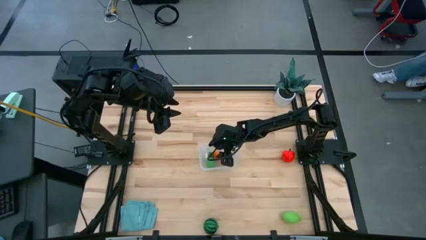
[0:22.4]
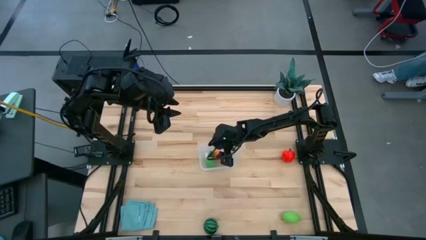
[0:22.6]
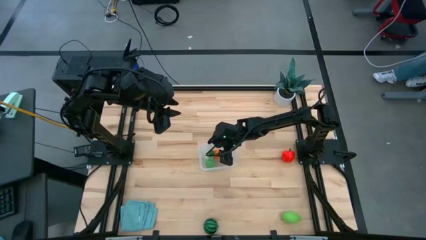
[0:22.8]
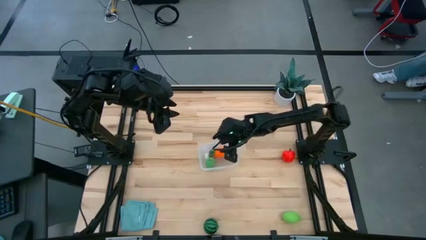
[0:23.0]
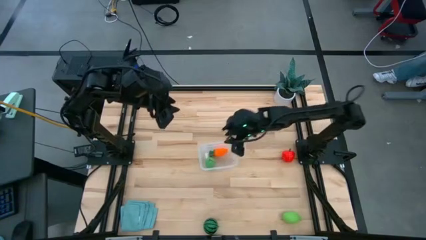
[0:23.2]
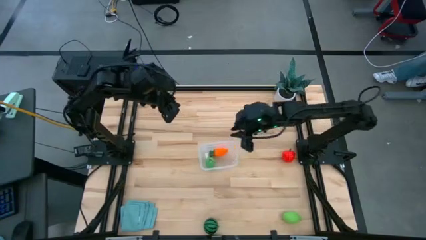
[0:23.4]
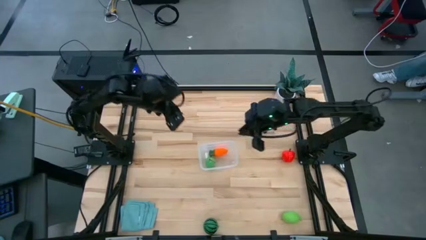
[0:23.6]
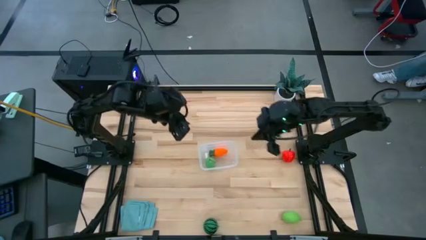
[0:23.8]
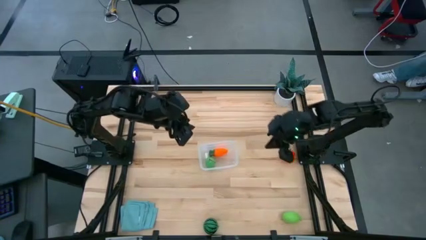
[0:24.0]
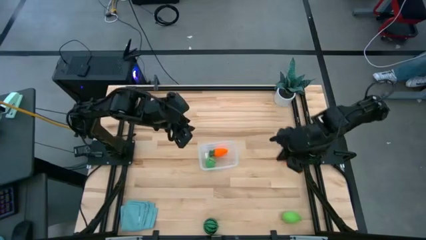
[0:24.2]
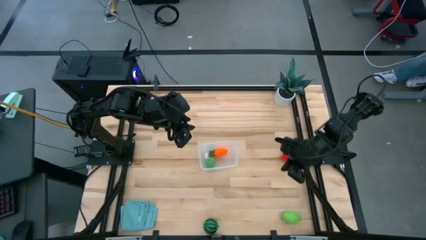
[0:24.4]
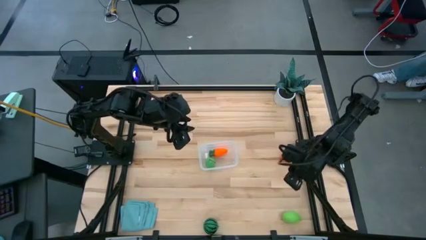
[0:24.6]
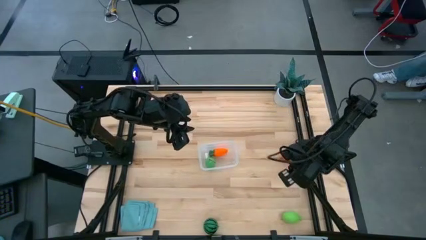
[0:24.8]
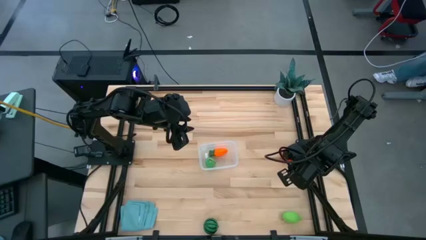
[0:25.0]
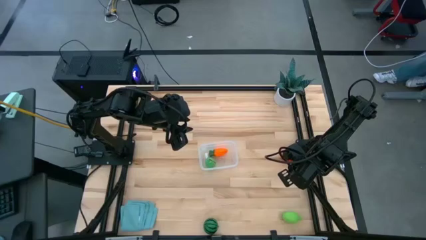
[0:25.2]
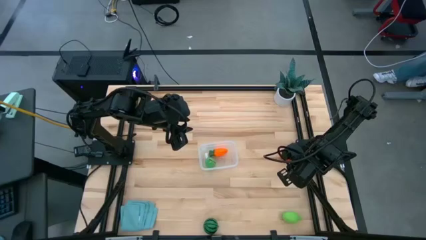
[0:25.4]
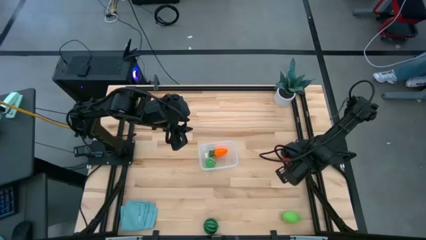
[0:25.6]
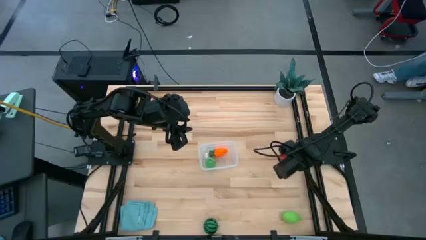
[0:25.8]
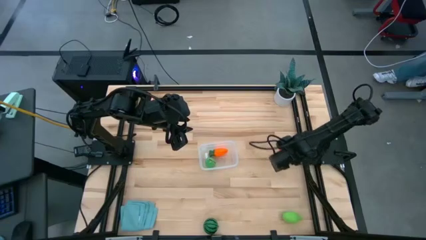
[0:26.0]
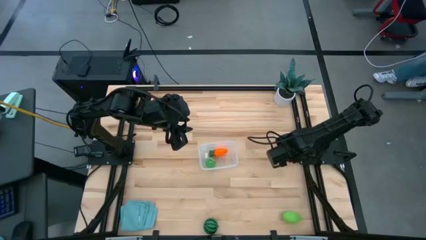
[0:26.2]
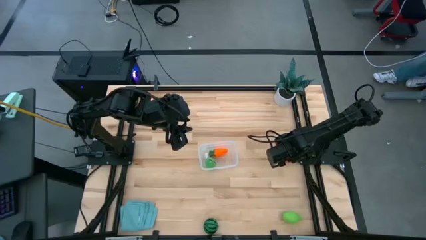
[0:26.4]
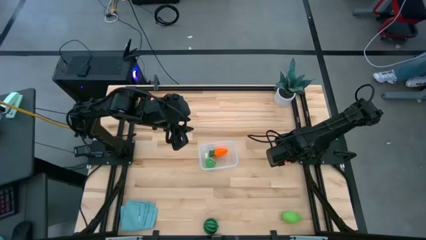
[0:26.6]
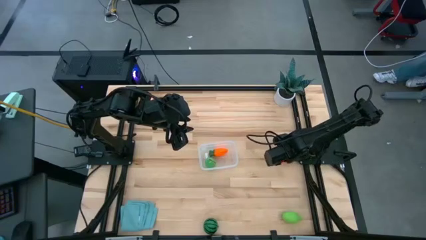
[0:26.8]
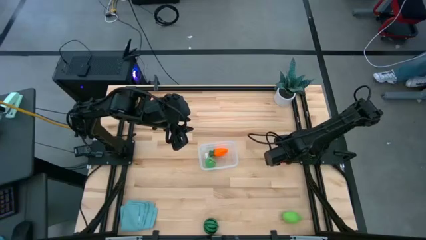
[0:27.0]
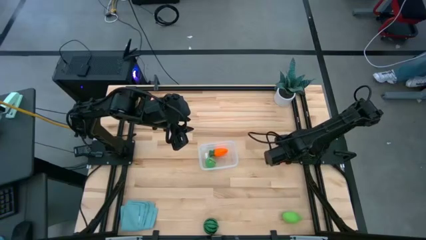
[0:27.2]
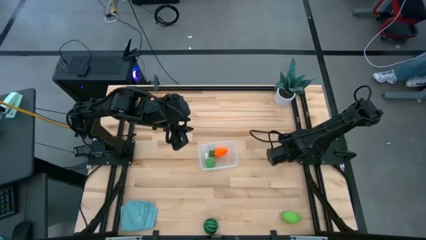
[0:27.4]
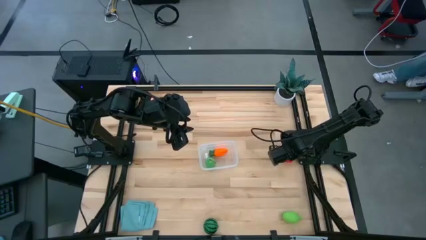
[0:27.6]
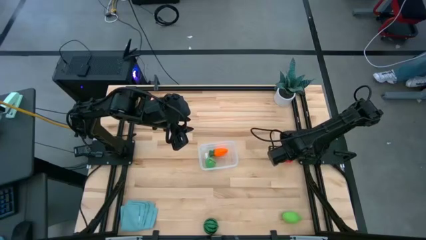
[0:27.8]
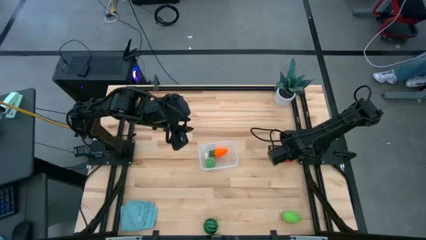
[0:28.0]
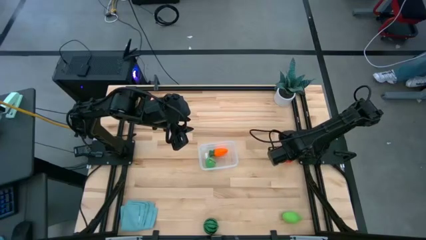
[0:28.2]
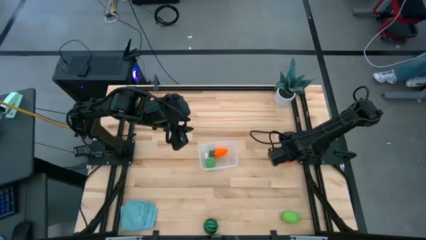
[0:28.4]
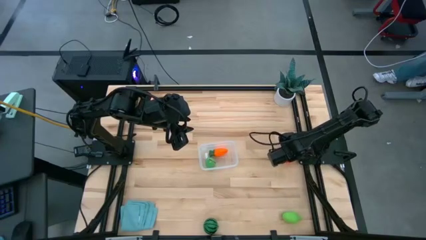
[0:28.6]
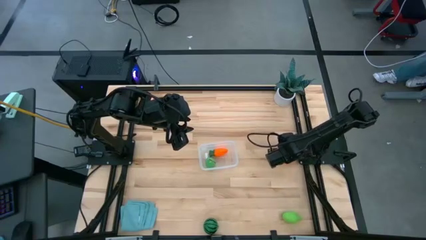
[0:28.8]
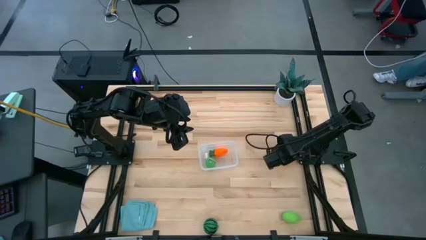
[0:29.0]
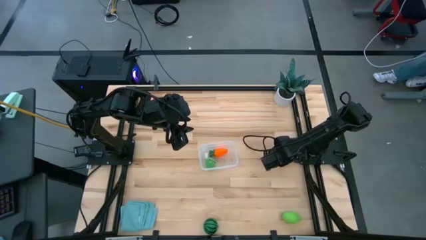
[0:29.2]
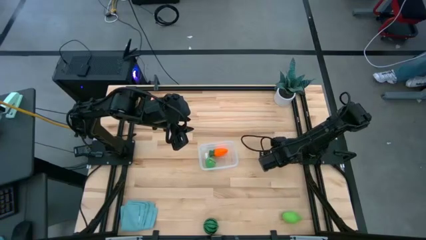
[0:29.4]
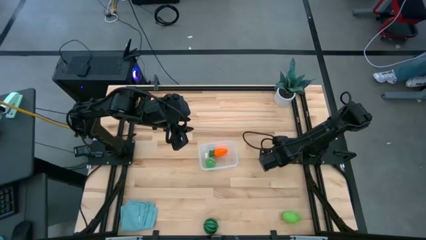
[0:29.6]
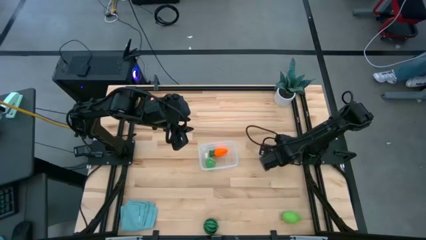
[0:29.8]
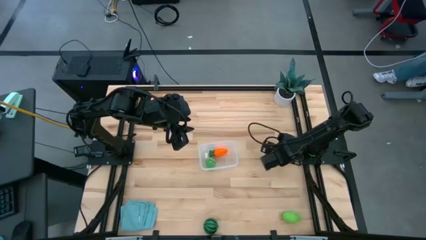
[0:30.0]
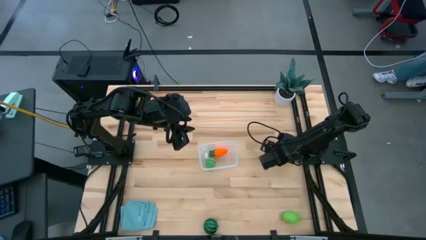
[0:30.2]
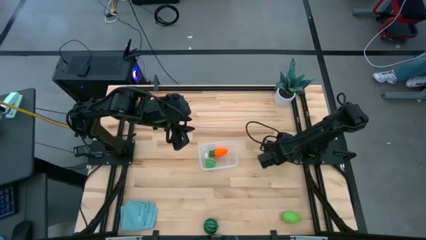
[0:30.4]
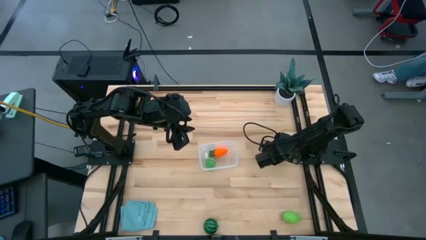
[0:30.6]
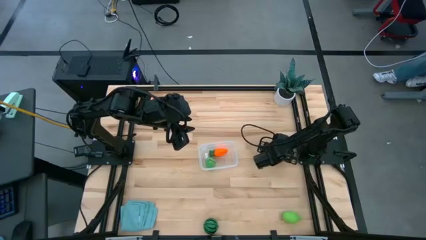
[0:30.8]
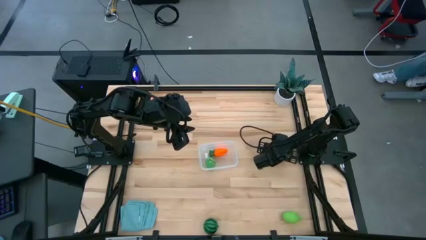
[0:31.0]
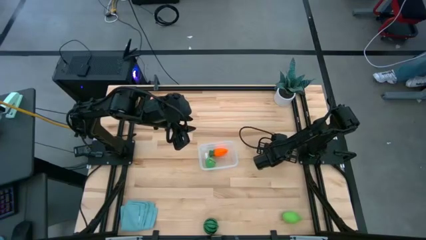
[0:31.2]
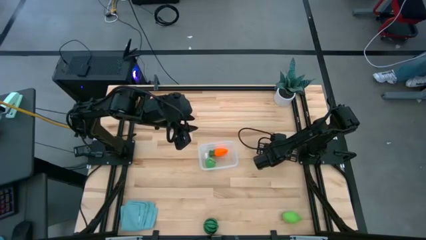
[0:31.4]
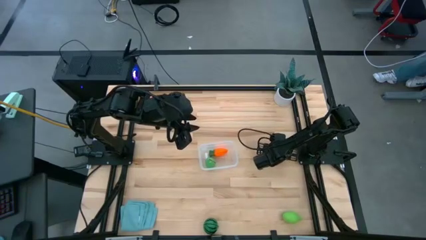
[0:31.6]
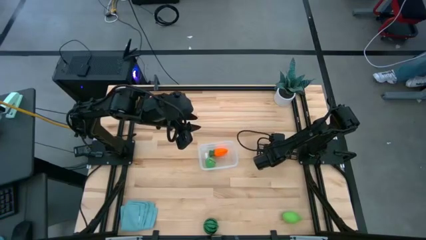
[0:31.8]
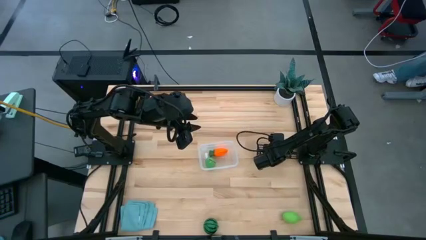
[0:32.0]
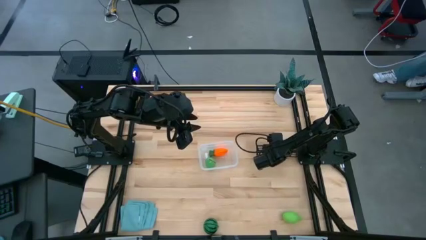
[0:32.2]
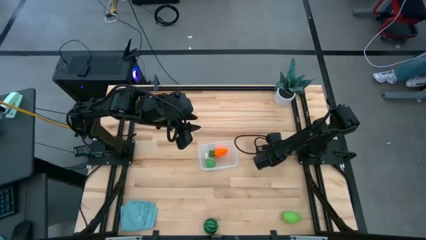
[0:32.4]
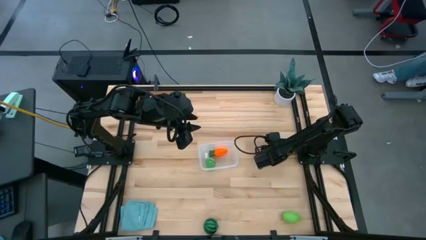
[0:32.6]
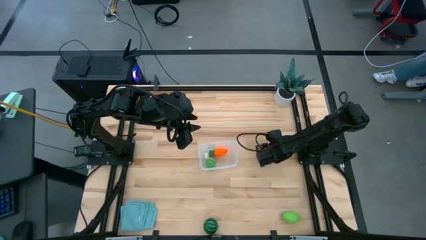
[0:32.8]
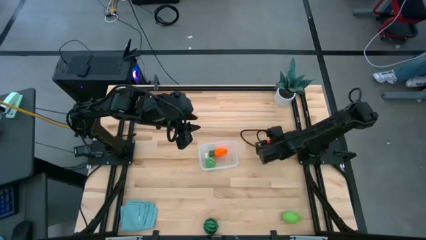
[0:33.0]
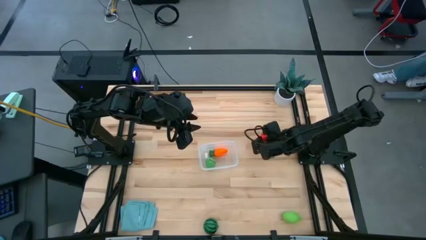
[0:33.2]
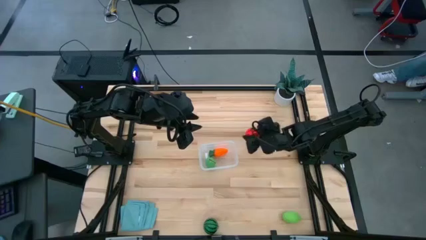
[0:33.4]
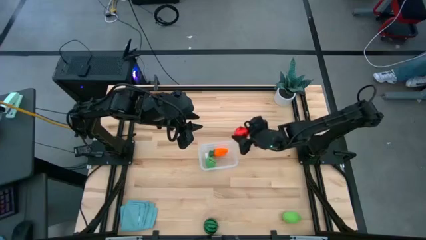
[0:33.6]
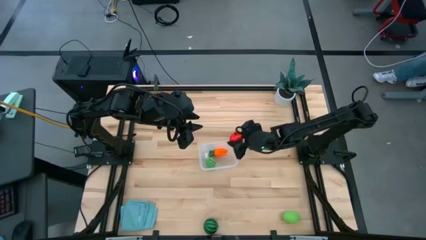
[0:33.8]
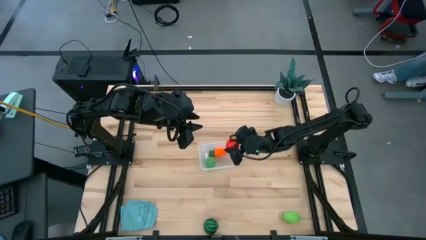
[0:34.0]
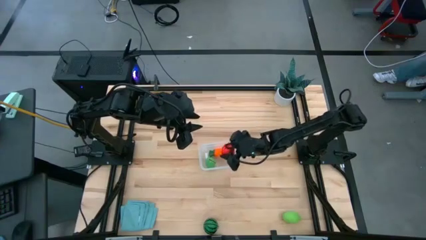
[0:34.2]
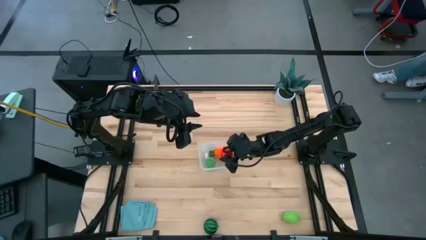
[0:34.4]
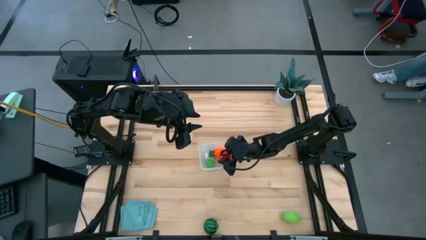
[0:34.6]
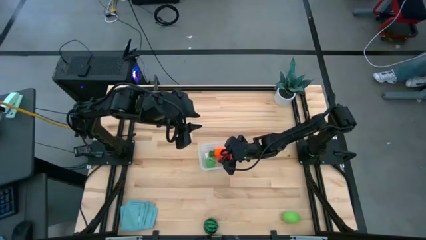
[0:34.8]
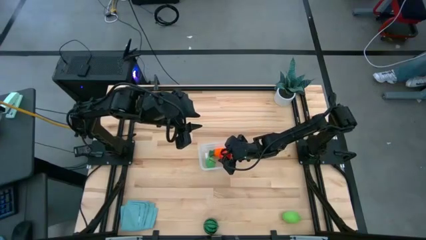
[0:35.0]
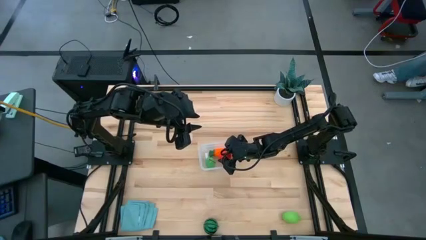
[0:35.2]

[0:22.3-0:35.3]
Task: Pick and placing Produce into tupperware
Put the red apple into the transparent bin

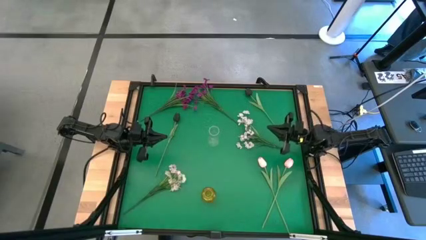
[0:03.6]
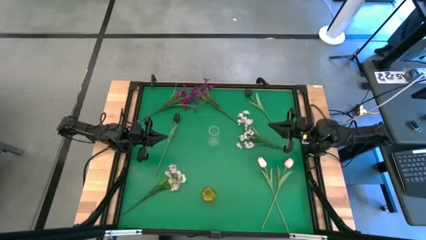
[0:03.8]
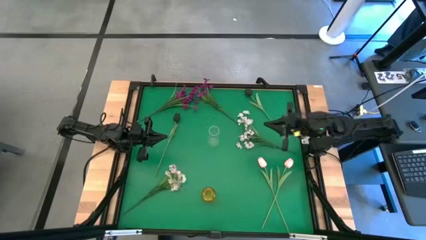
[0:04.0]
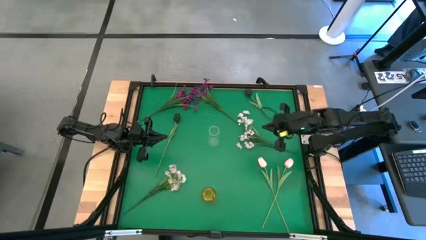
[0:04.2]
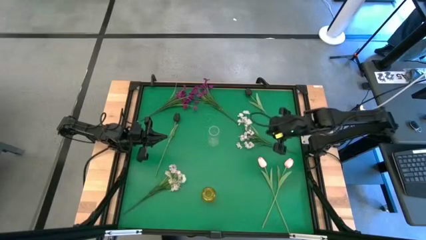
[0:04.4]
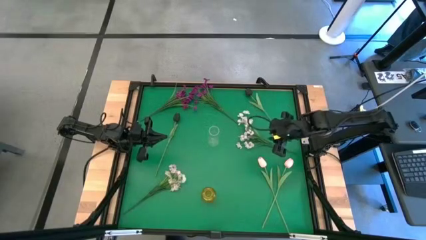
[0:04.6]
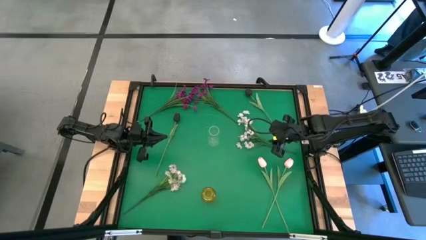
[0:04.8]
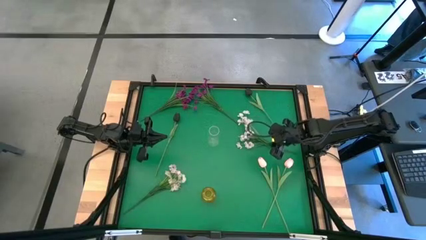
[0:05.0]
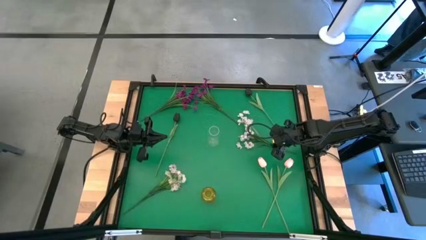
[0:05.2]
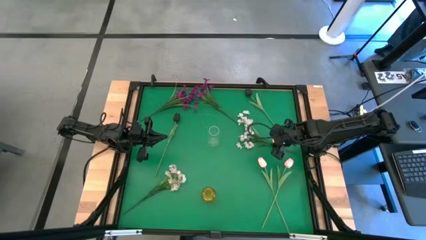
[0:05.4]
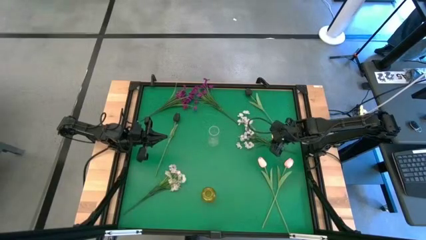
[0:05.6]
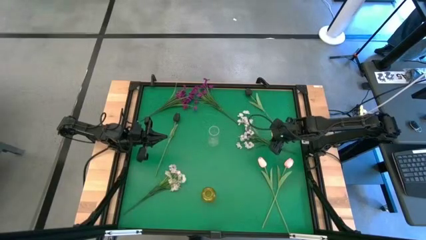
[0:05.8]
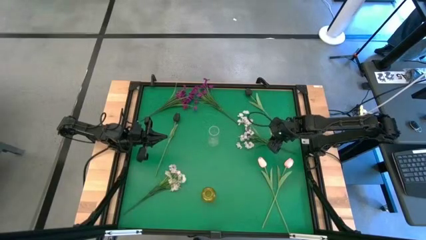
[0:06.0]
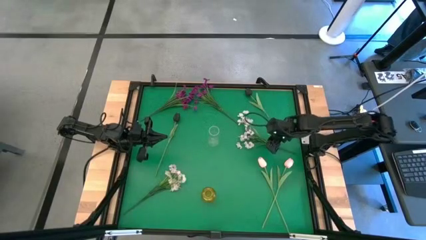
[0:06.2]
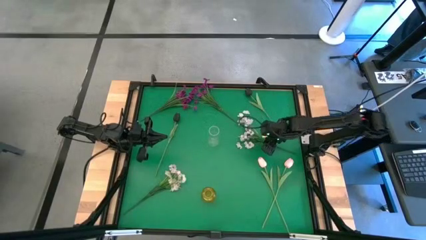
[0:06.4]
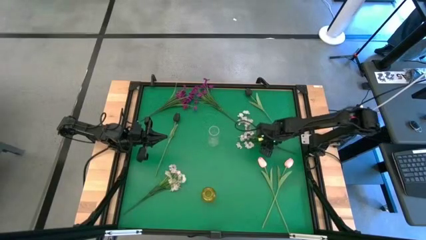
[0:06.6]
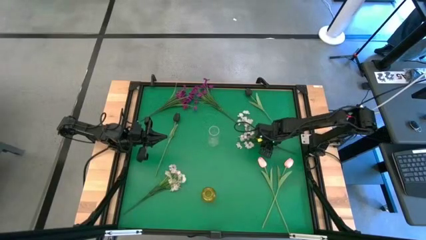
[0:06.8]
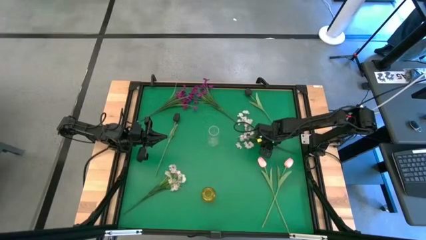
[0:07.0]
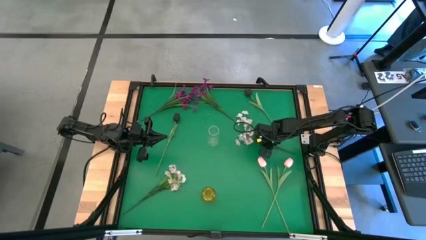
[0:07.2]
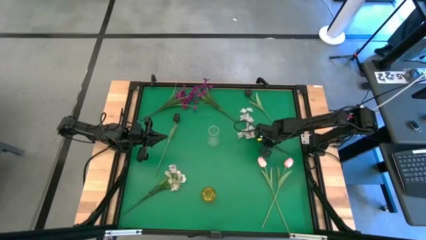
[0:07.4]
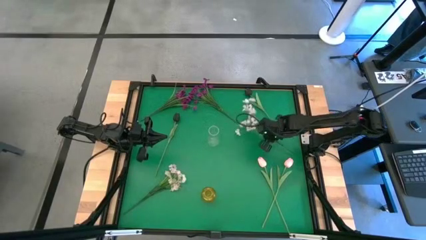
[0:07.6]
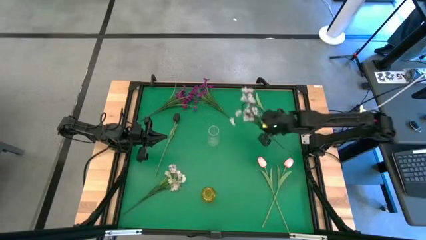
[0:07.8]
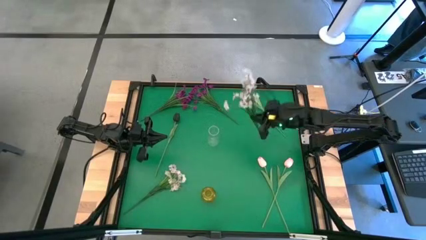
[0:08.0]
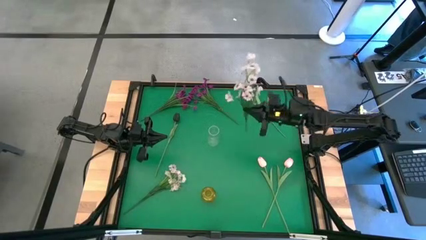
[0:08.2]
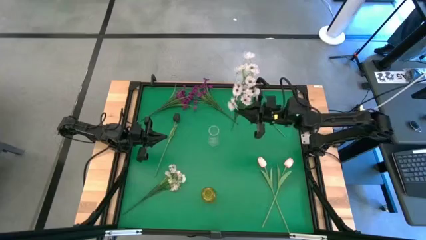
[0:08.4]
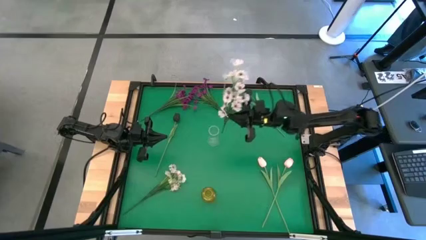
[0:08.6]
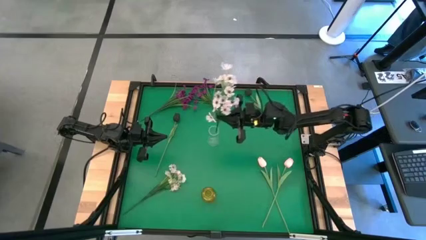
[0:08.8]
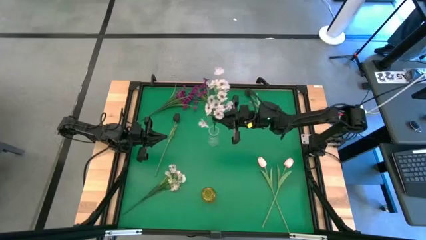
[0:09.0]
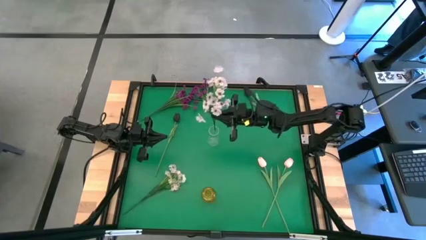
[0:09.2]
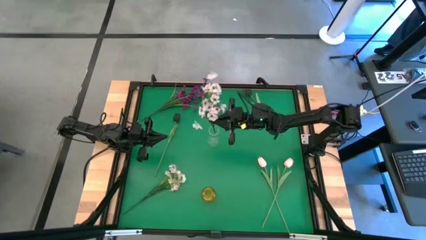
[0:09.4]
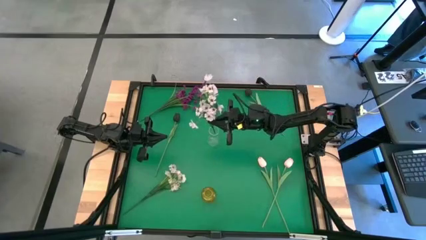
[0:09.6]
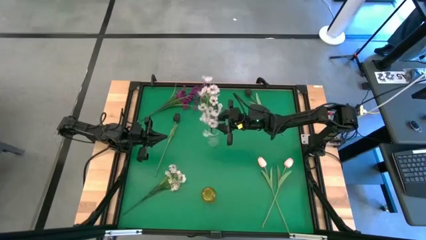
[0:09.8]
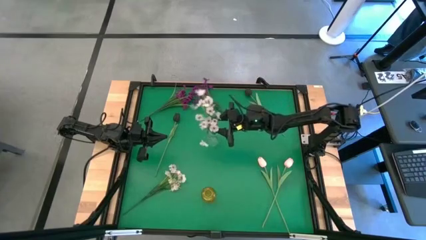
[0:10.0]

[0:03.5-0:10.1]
Task: Sort flowers into vase by color
Put the middle right white flowers into the transparent vase
